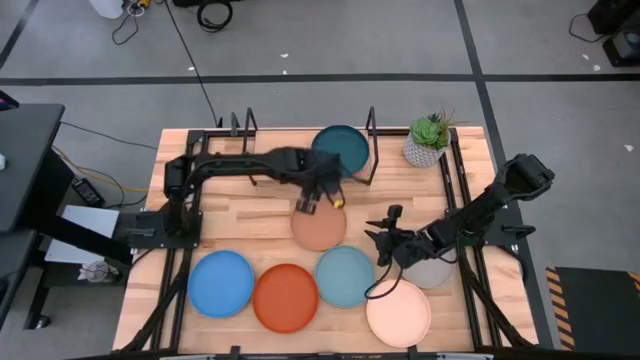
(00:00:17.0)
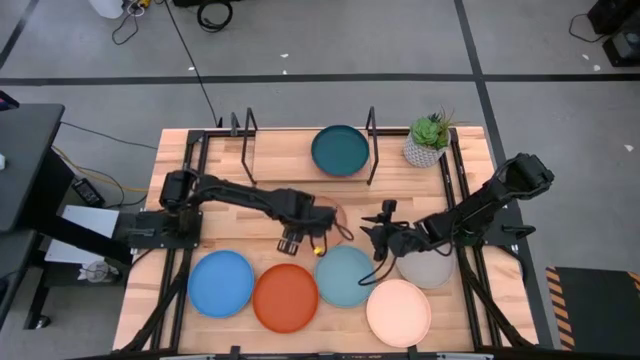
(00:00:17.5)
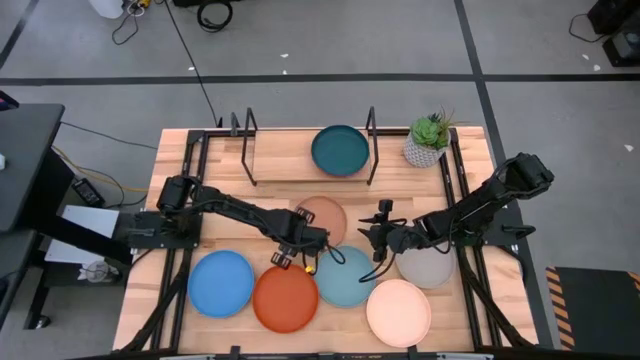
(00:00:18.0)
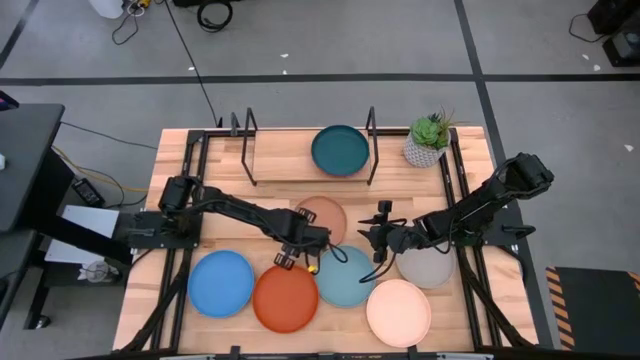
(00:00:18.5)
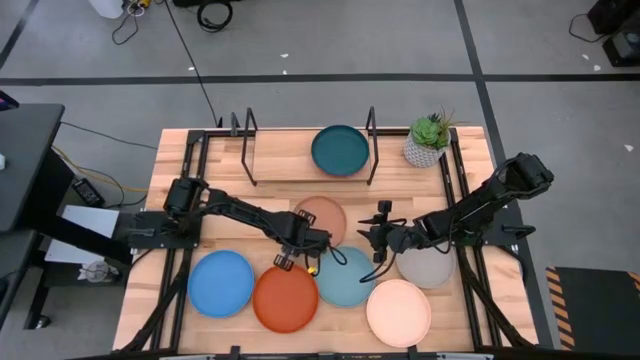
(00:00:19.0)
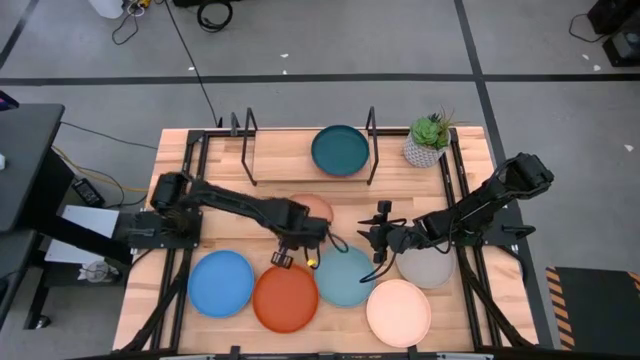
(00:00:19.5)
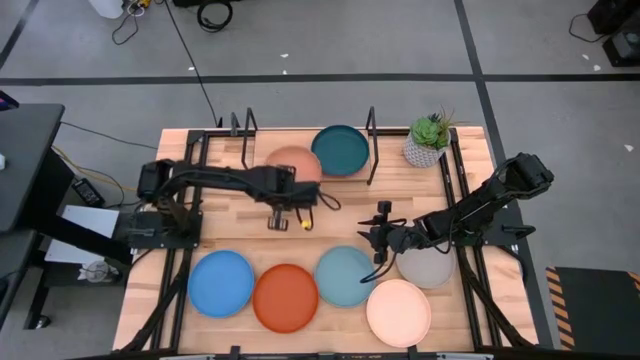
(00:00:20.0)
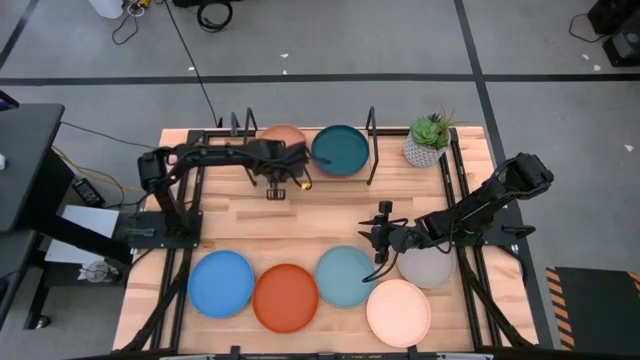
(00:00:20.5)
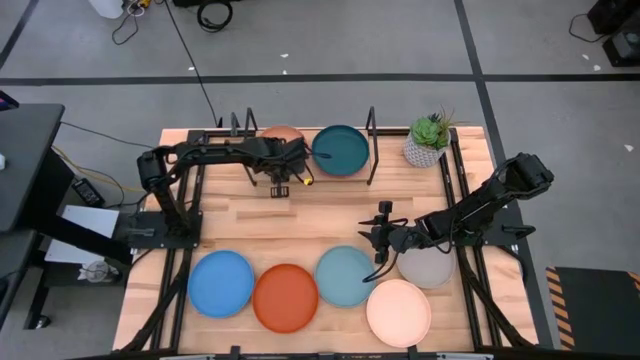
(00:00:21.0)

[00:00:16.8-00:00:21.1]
Task: Place and stack plates onto a shelf
Put the brown plate on the shelf

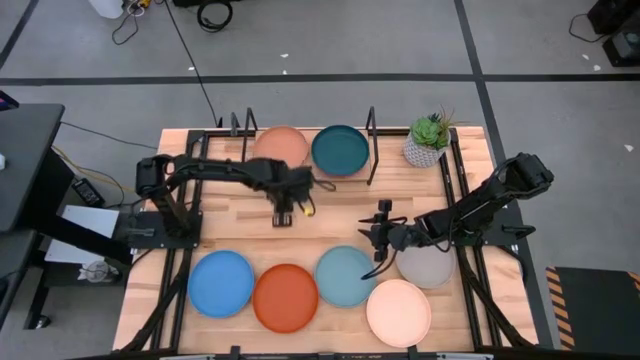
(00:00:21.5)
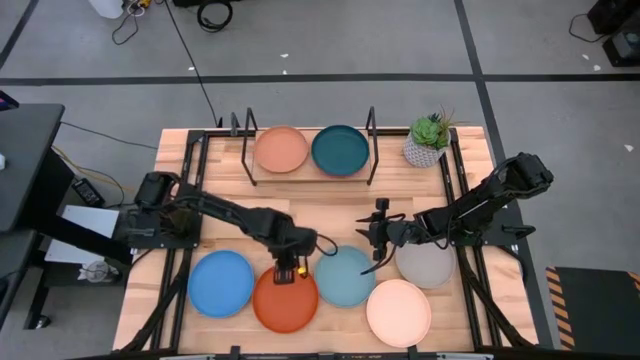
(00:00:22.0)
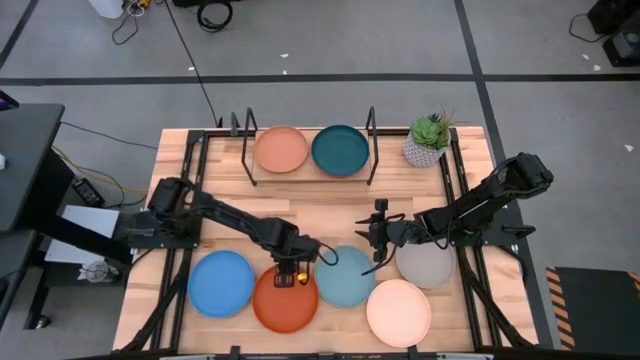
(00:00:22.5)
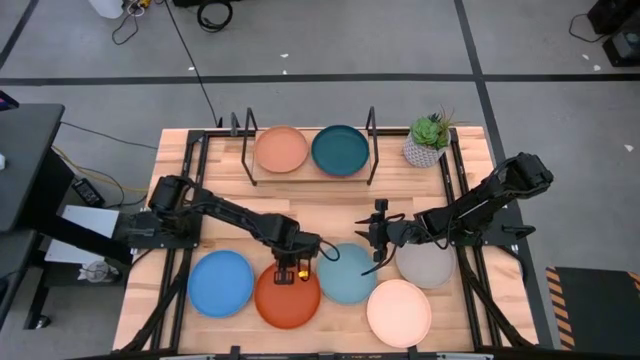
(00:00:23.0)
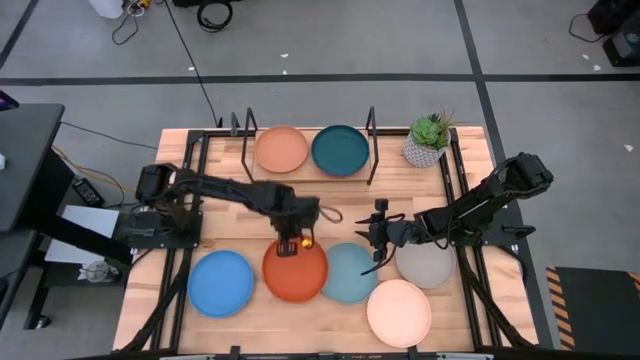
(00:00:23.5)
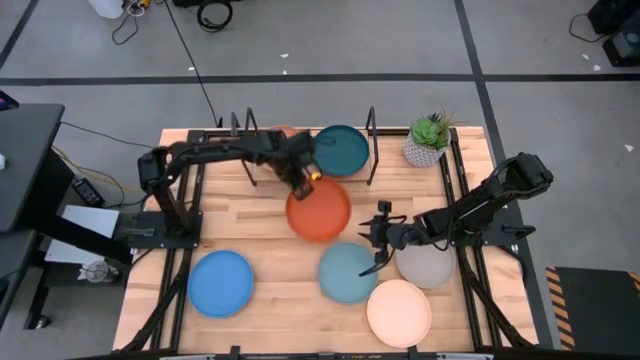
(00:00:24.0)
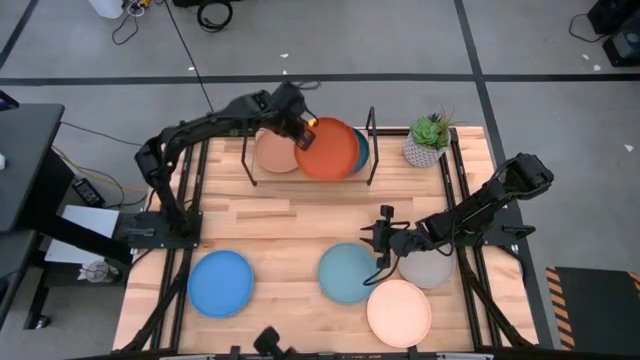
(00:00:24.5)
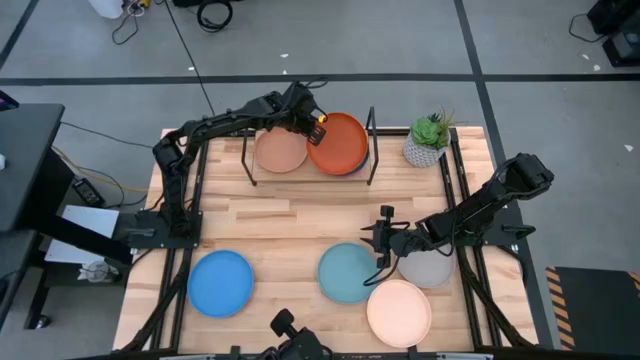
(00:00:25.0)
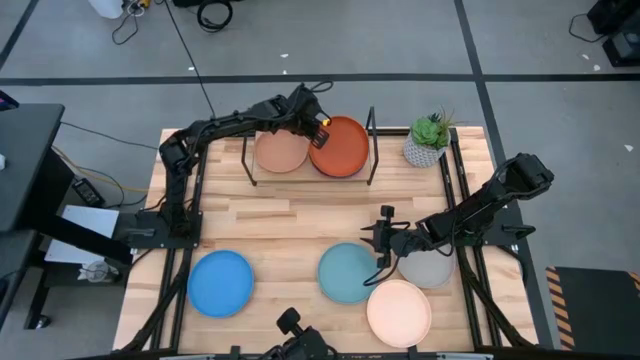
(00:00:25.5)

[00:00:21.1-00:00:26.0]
Stack the orange plate on top of the dark green plate on the shelf

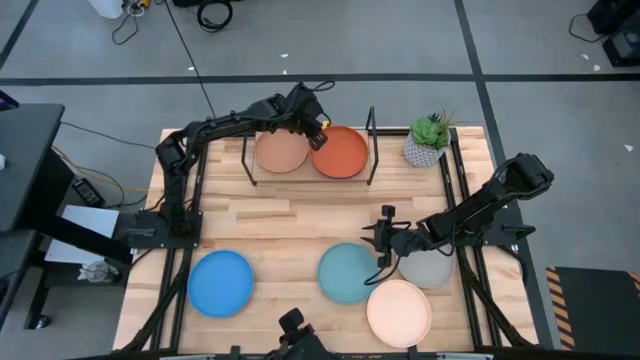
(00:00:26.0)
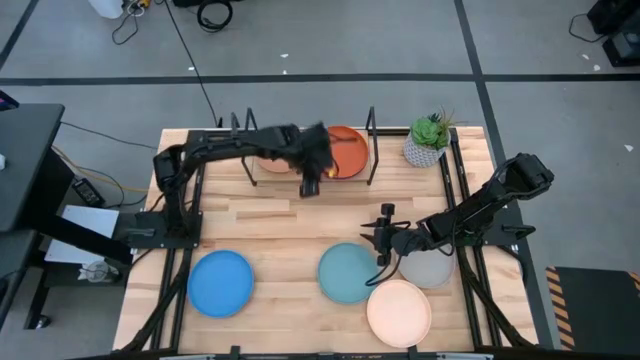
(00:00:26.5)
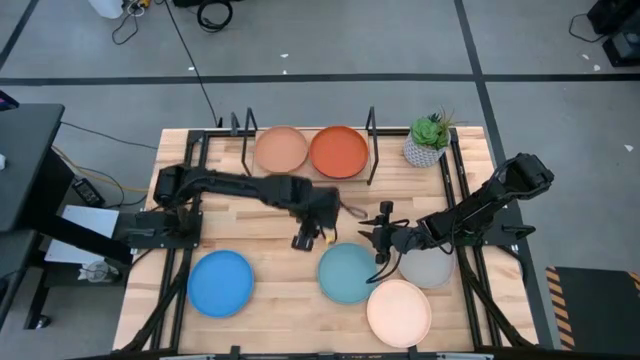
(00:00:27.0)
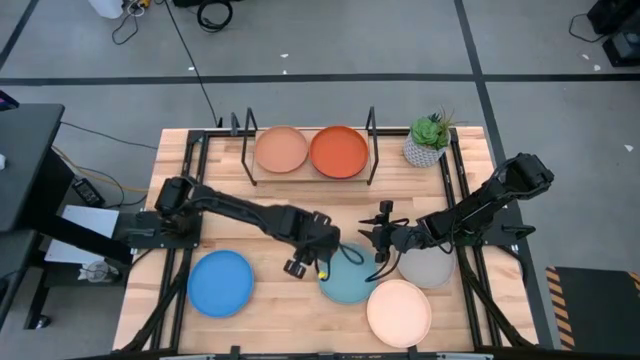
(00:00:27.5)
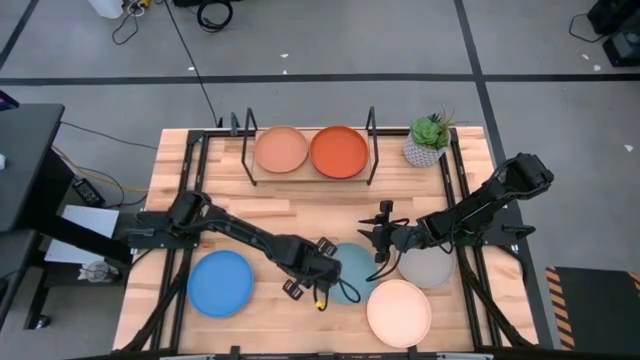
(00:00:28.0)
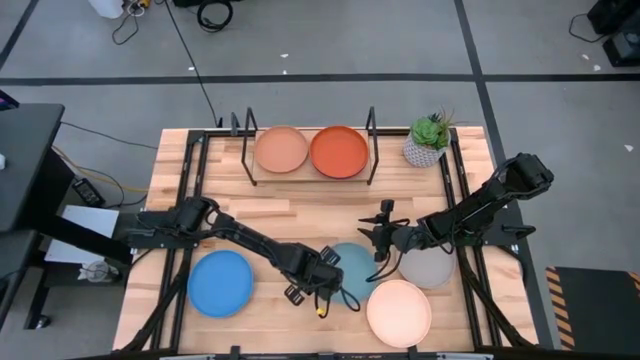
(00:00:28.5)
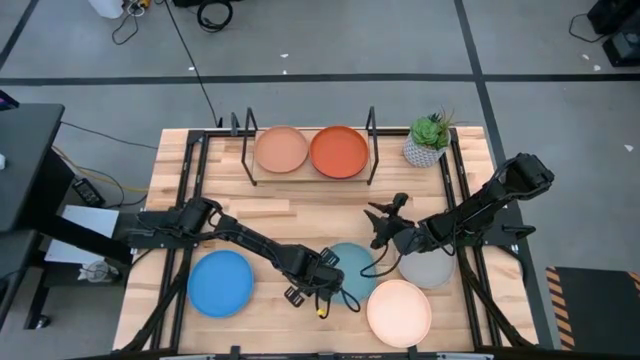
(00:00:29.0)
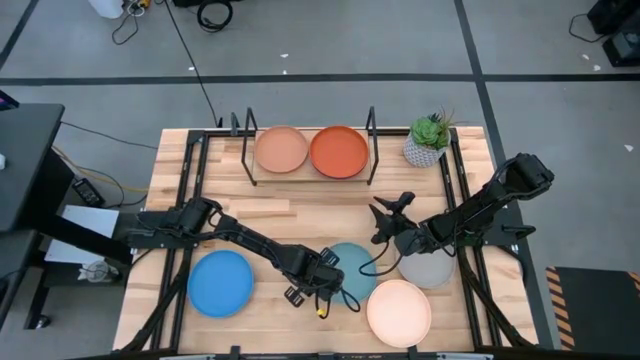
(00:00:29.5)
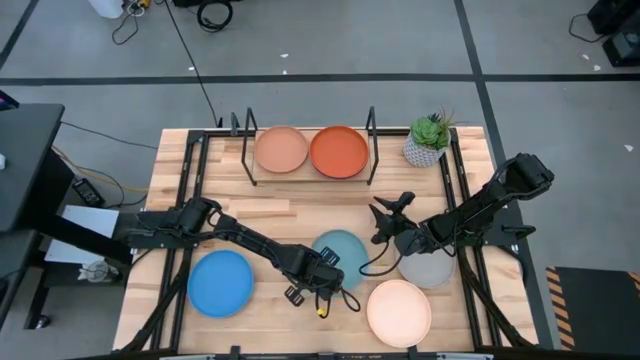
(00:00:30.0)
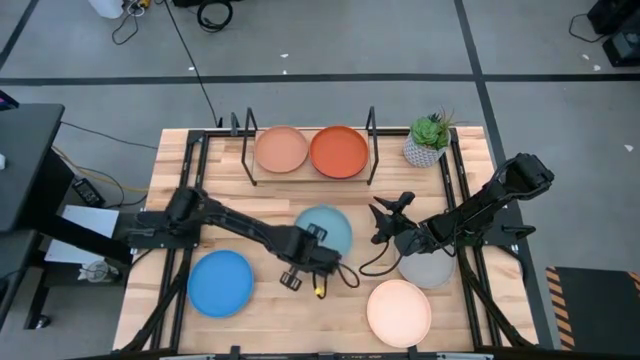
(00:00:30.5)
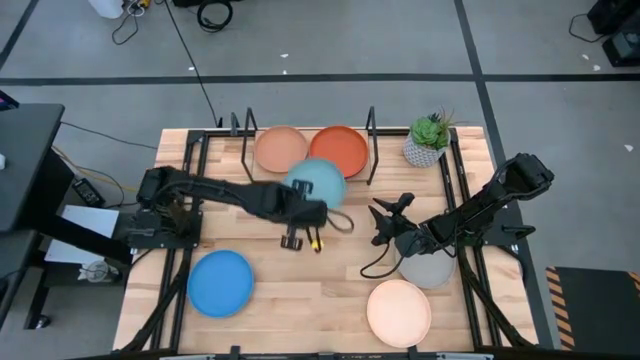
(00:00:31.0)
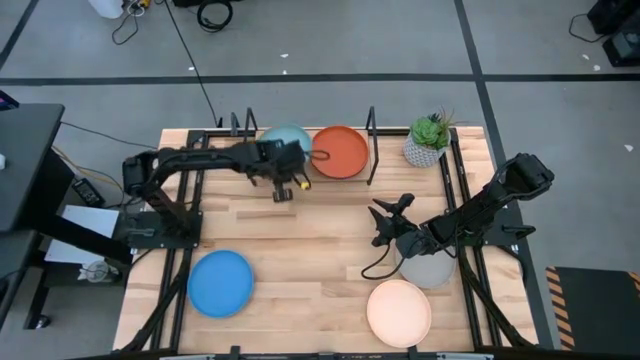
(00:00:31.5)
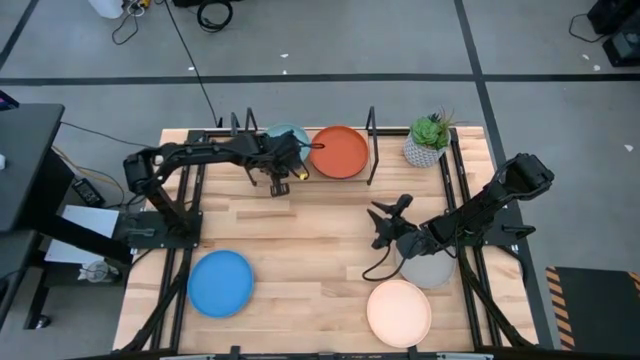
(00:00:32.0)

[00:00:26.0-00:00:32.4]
Stack the light blue plate on top of the brown plate on the shelf

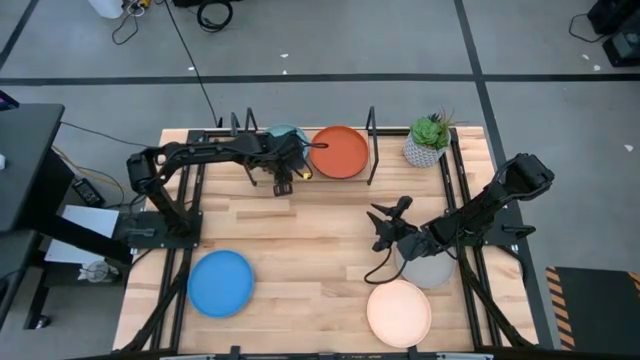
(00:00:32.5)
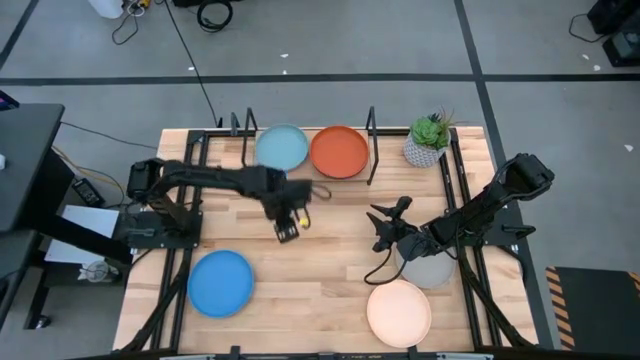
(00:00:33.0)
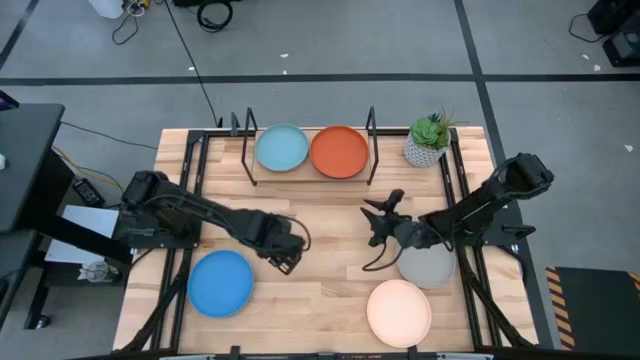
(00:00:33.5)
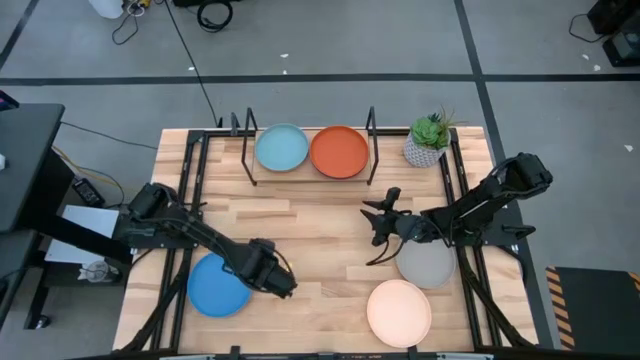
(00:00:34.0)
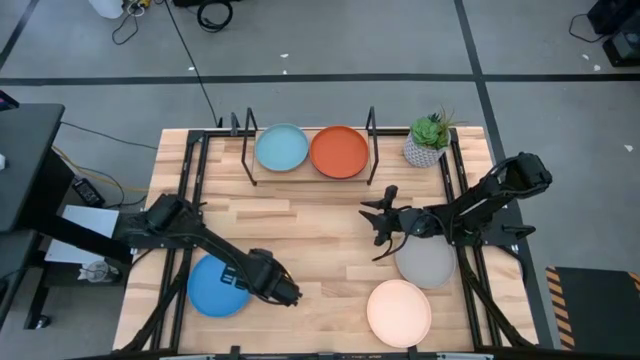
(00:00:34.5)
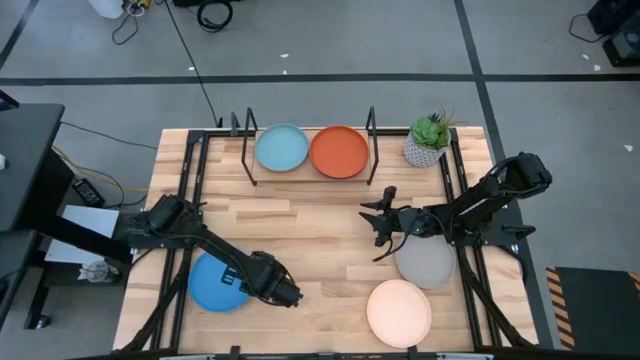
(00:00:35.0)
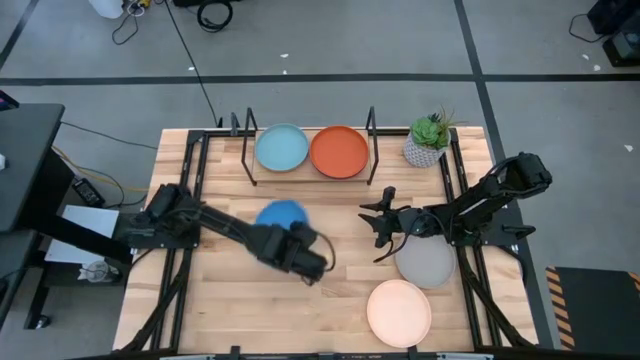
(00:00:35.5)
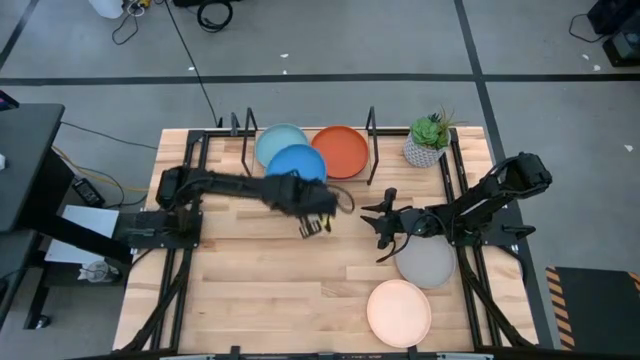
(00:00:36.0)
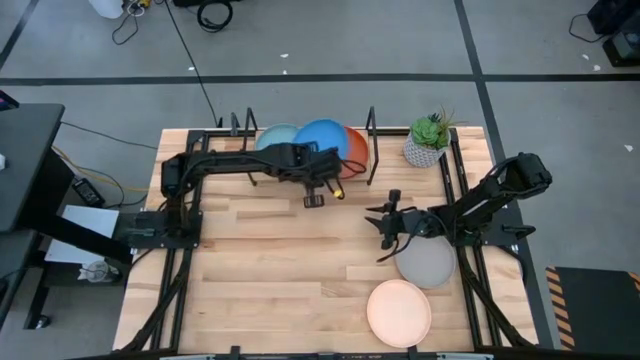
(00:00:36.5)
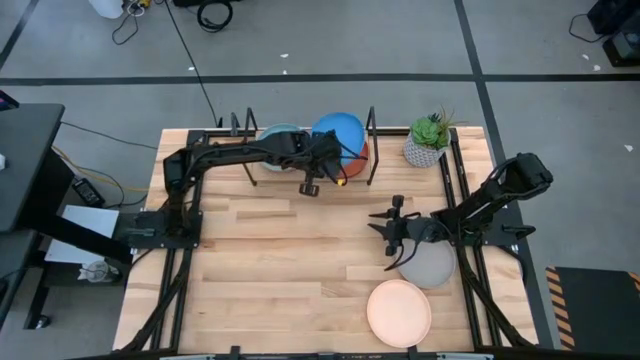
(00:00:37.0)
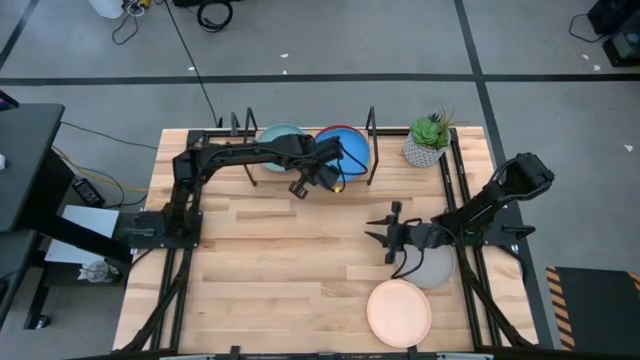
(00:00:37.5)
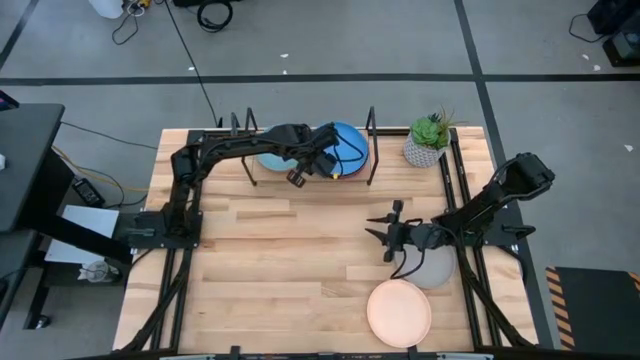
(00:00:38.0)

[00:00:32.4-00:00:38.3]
Stack the blue plate on top of the orange plate on the shelf
